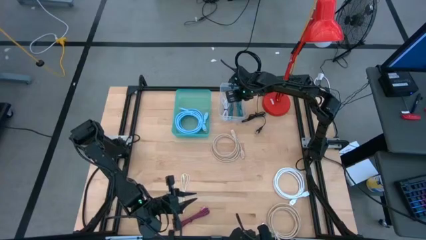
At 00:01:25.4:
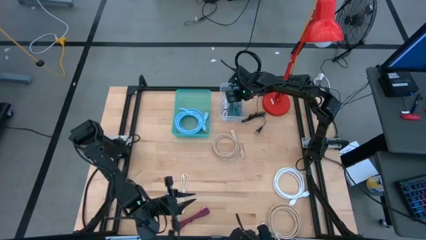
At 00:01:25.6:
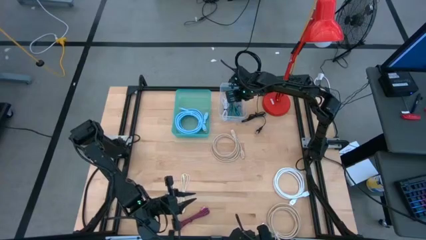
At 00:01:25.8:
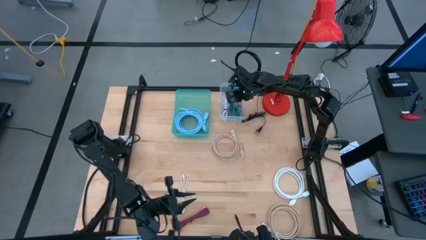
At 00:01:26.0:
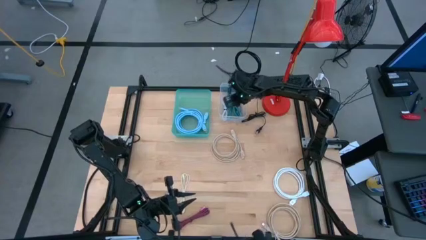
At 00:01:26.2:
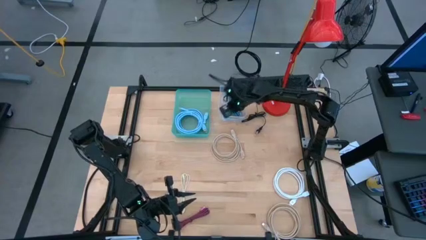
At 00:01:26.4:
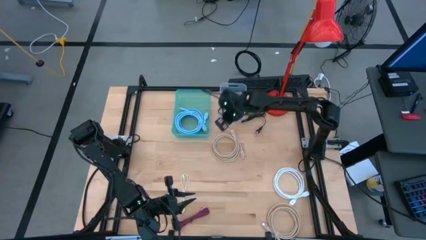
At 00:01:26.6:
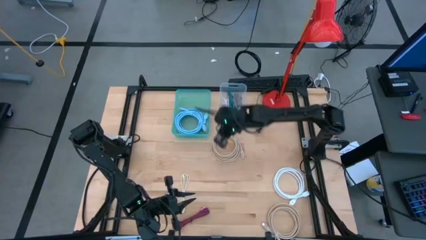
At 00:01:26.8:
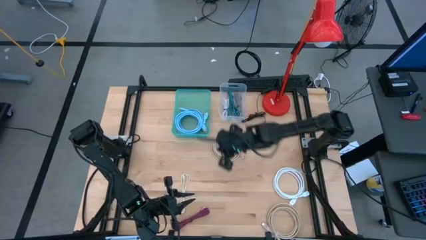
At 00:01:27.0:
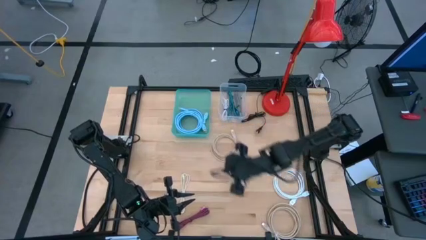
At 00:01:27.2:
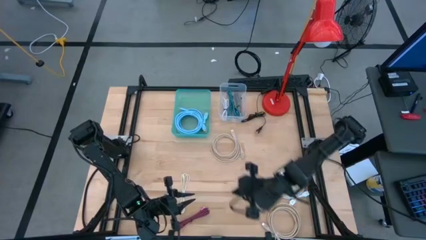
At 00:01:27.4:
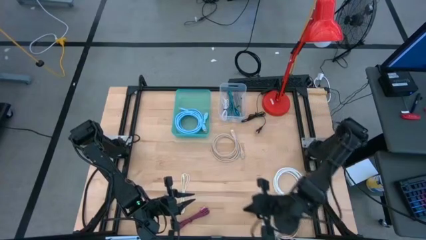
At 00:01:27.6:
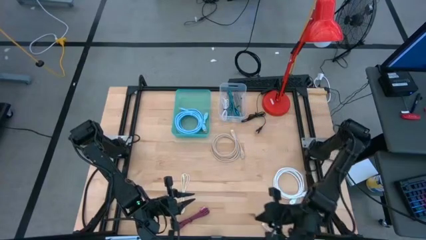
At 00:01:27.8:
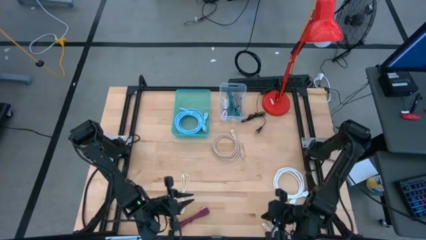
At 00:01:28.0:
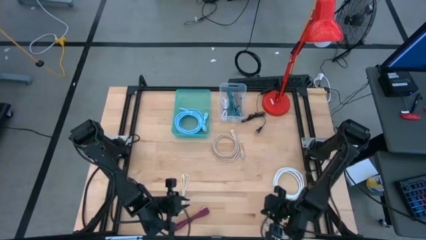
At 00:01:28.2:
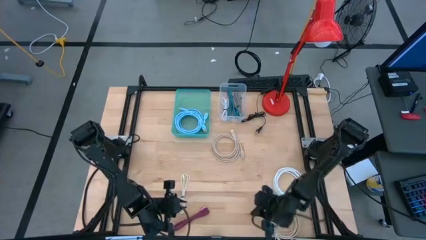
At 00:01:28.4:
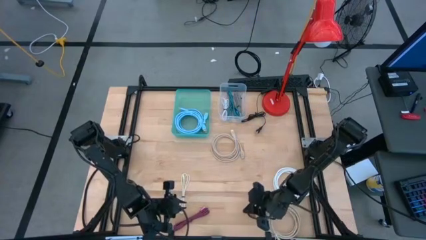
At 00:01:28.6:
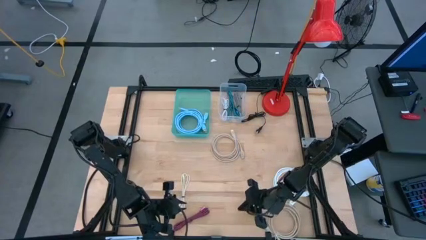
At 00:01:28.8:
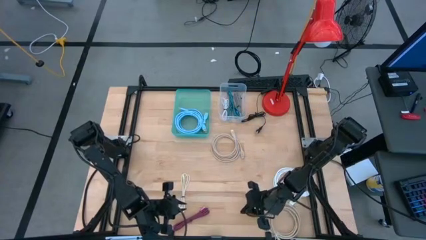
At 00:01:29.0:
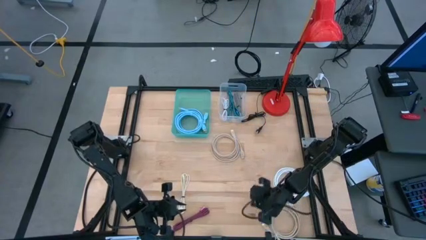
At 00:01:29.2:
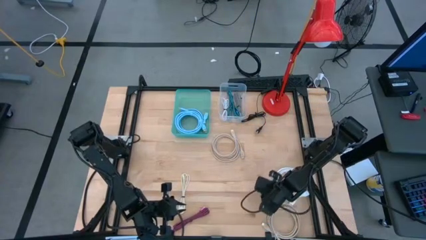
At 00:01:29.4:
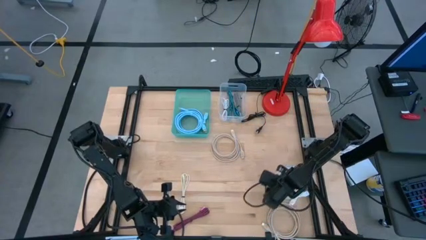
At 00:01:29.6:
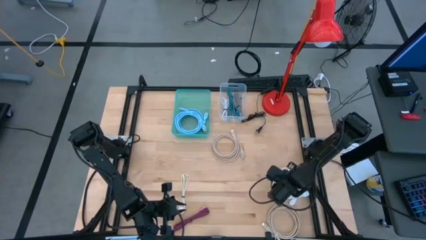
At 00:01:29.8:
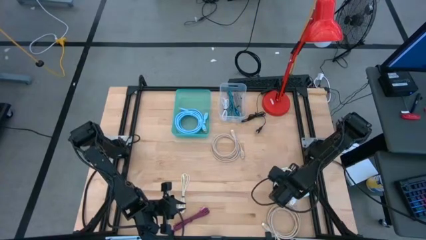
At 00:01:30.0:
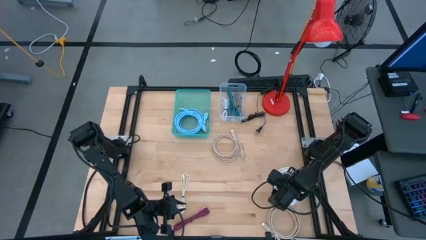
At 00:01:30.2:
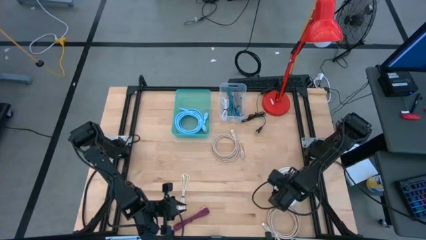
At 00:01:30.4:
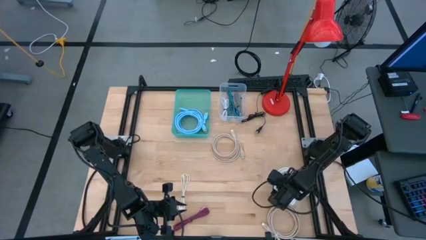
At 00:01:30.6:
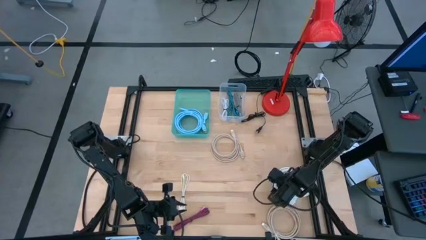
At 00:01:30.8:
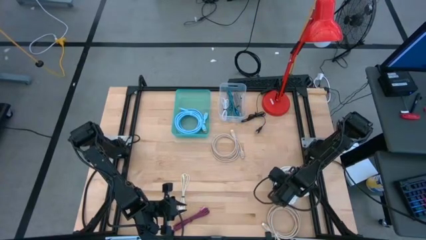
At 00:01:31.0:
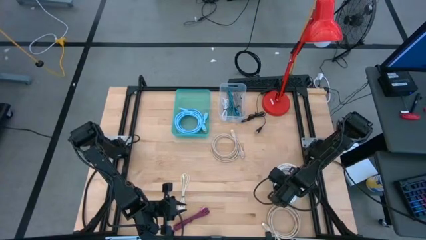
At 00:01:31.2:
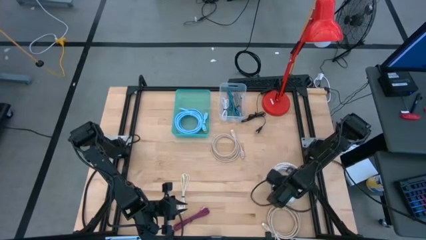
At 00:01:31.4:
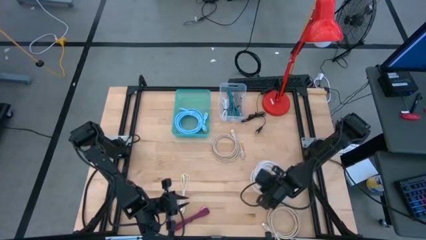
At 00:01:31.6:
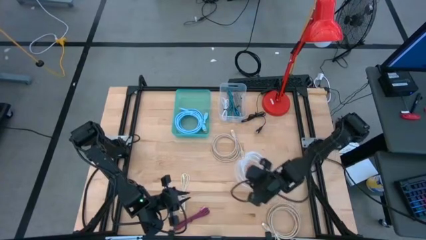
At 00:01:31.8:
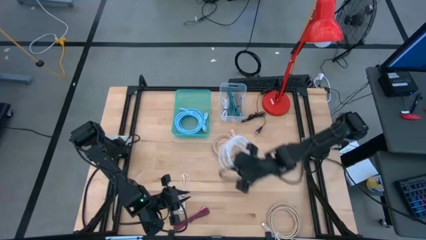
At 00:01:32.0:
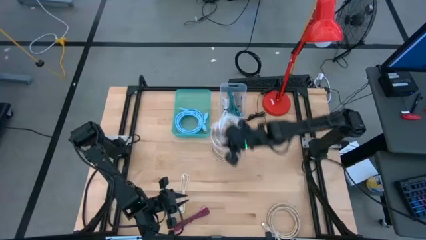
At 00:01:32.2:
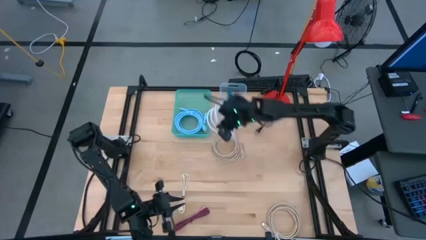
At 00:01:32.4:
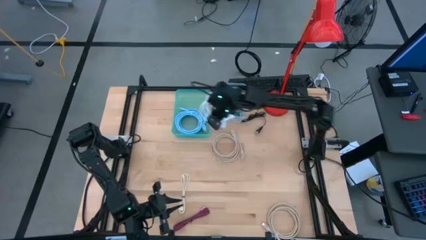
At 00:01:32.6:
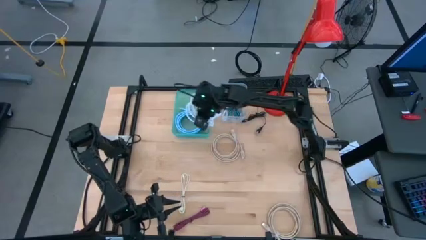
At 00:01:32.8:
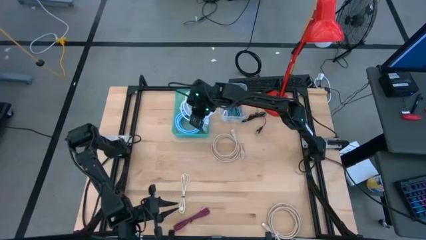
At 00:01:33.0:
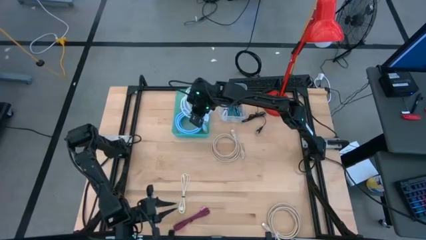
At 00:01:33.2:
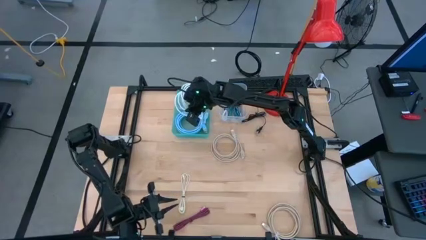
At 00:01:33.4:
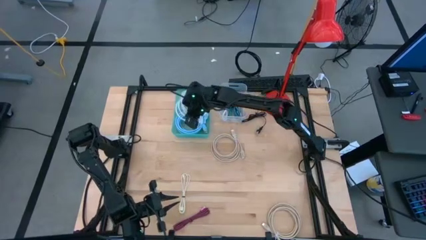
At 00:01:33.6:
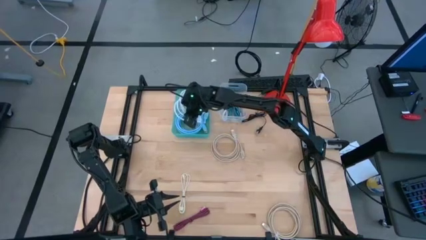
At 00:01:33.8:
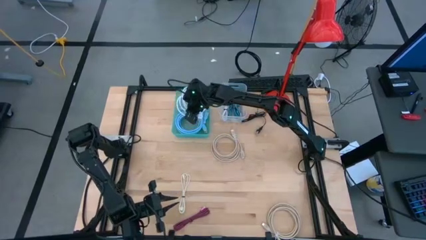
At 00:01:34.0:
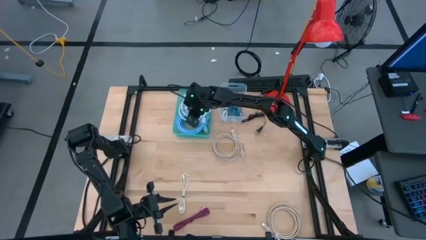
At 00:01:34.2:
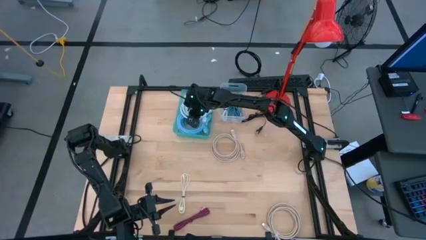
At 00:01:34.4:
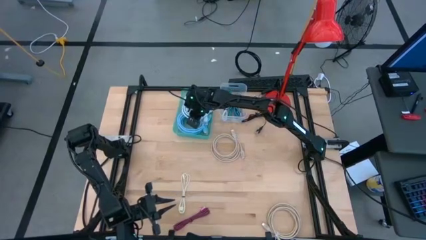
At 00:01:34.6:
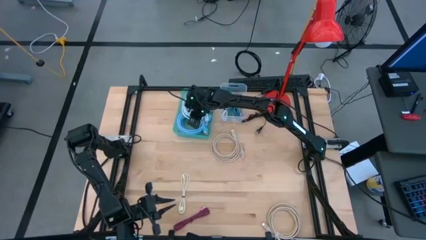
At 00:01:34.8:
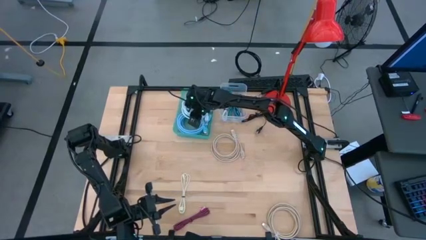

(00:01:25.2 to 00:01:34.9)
Task: Pick and place items into bin
Put the white HDMI cable into the green bin

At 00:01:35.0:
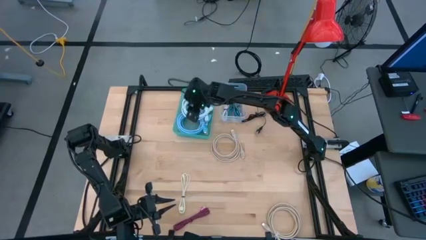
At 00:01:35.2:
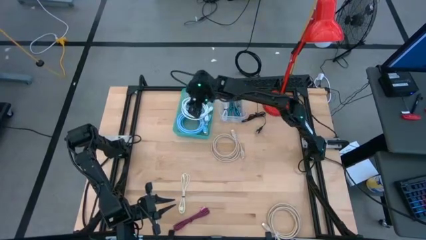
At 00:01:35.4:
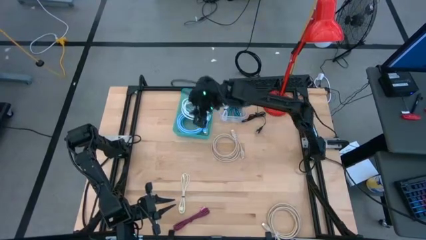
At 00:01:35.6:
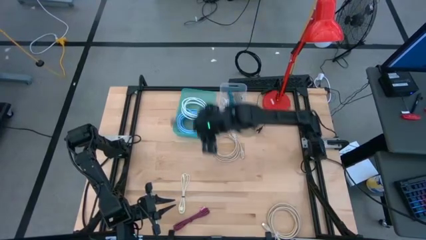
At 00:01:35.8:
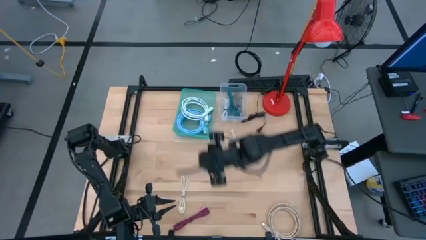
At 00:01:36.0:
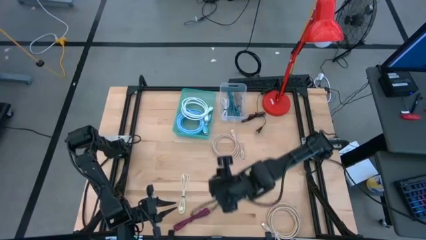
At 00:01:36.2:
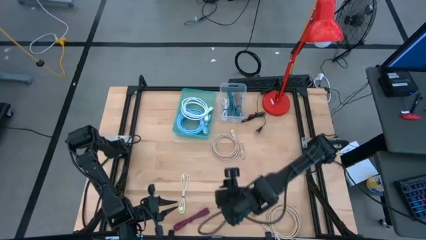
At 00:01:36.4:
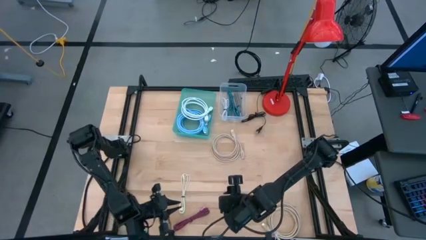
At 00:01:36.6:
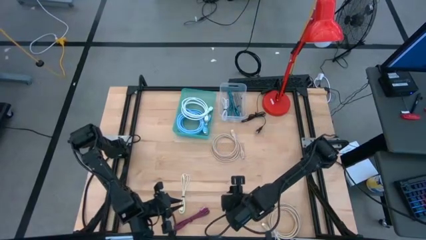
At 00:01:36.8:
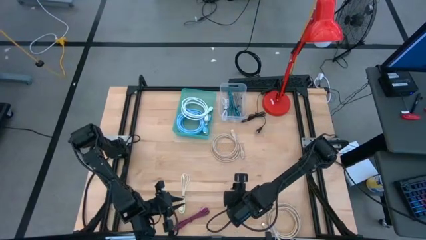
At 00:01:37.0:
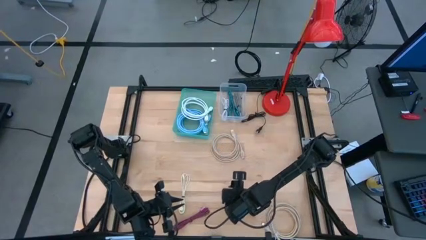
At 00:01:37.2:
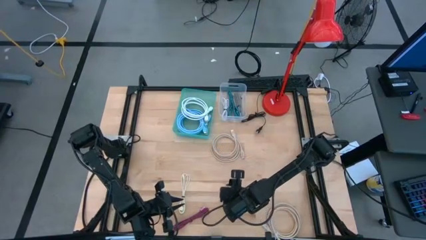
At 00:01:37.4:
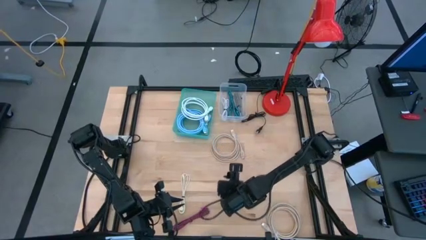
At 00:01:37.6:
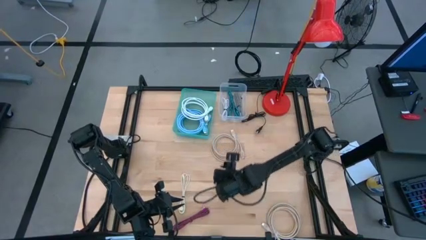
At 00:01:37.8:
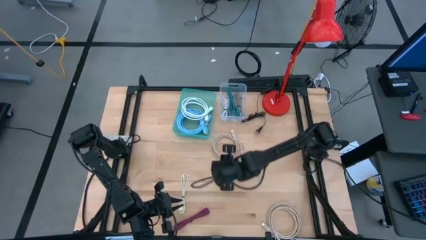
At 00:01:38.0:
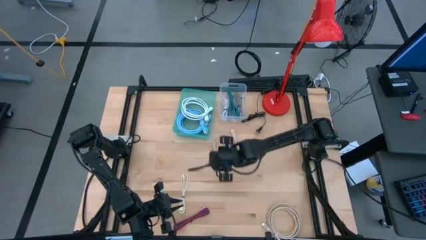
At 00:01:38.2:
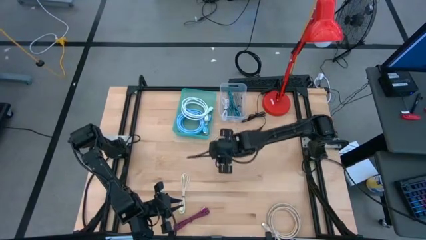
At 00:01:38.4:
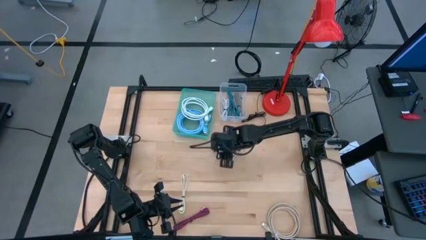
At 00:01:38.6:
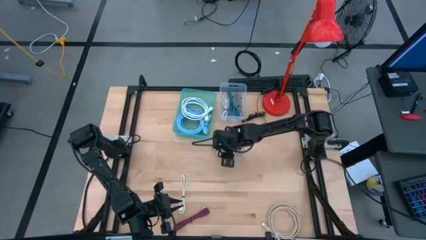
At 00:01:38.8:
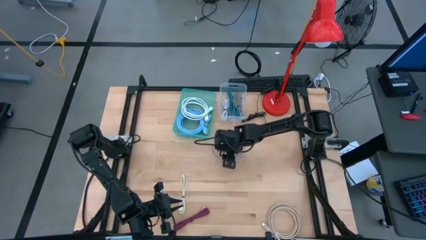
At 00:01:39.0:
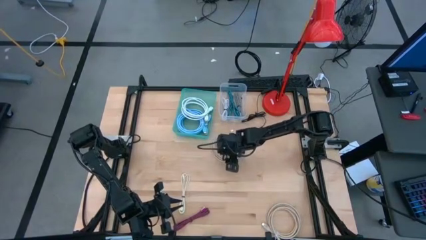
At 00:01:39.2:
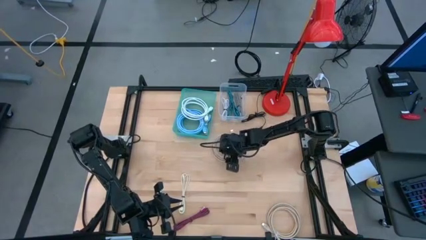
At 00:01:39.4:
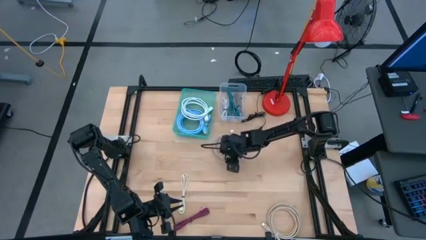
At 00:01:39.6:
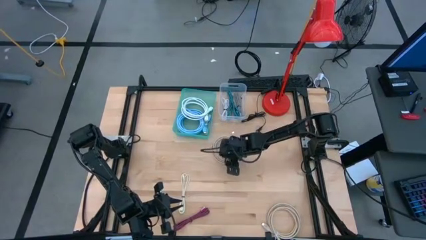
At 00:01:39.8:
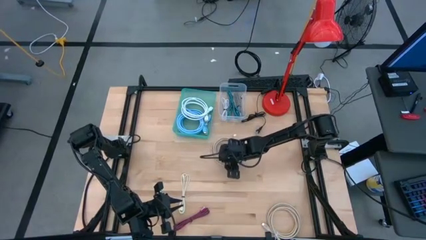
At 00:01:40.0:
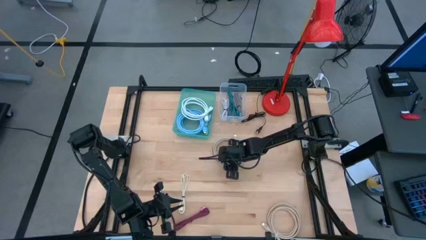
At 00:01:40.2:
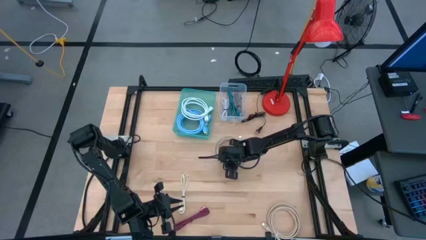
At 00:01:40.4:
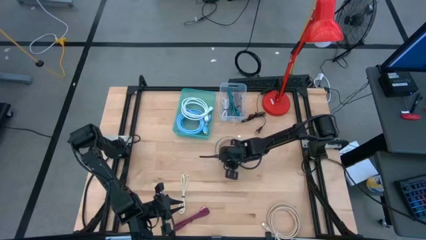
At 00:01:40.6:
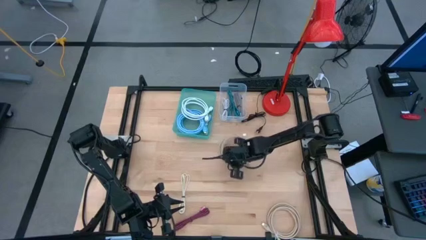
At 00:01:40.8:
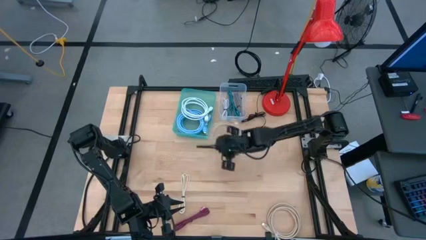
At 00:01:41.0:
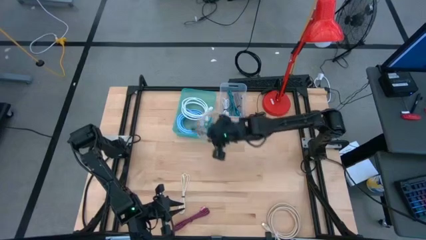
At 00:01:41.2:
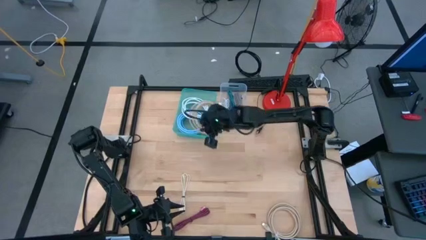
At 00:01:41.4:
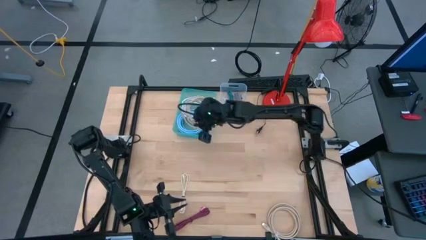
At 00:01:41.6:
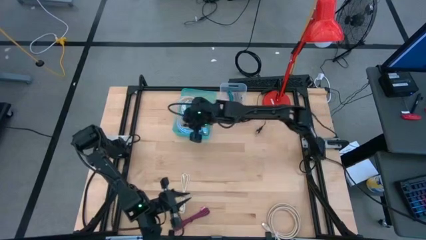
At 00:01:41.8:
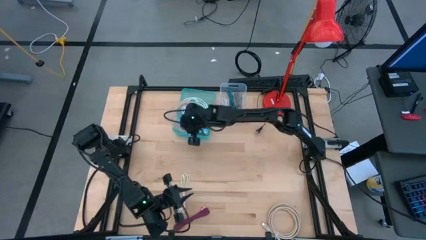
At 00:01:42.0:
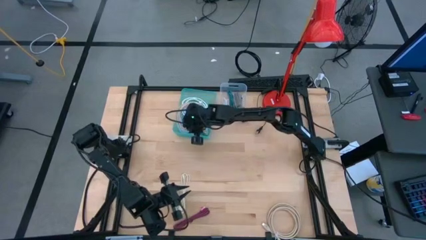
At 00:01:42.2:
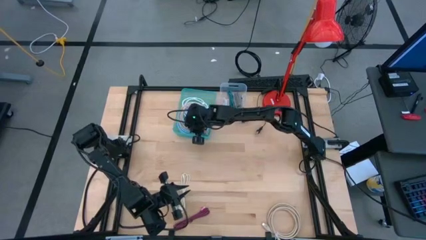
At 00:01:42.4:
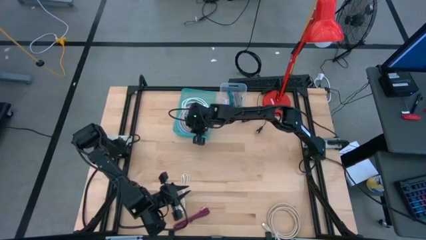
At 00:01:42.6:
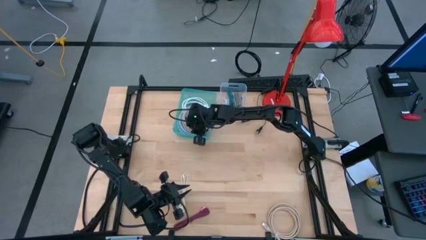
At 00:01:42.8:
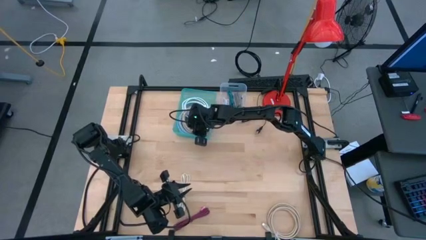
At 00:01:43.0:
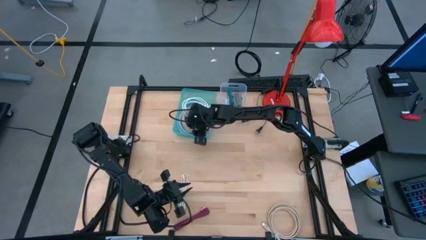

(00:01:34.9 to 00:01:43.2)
Put the top light brown HDMI cable into the green bin
